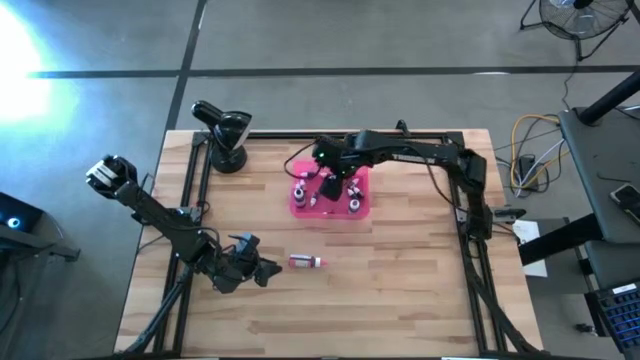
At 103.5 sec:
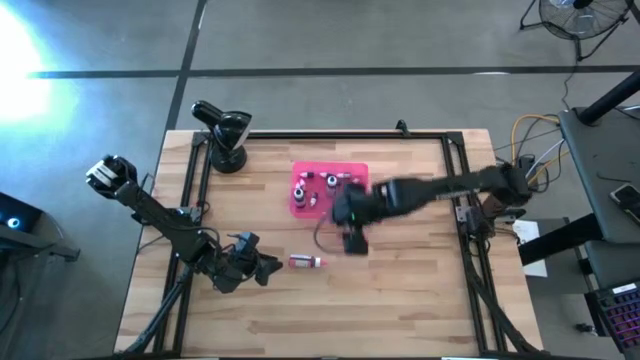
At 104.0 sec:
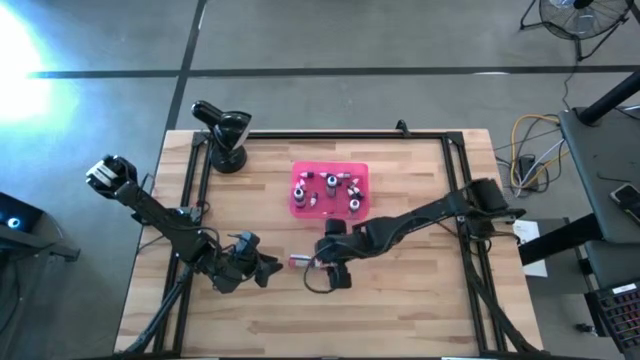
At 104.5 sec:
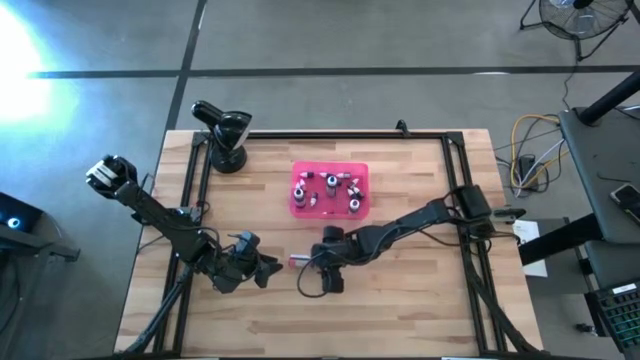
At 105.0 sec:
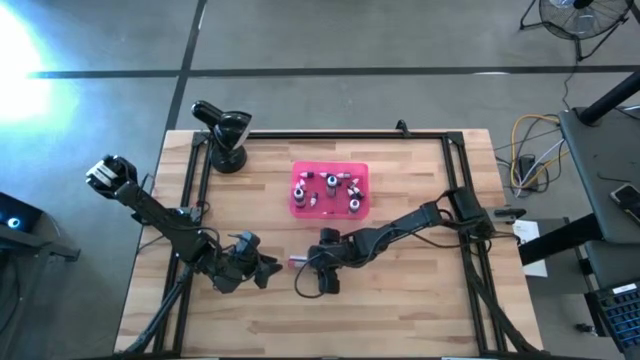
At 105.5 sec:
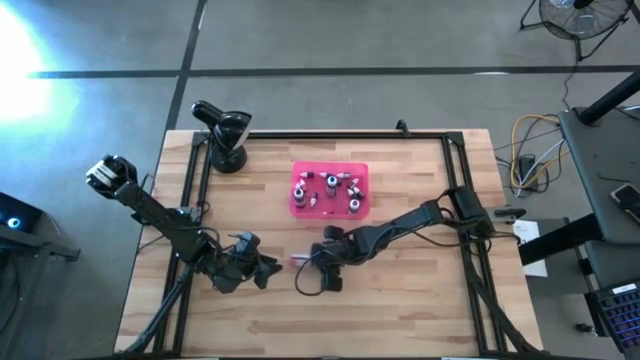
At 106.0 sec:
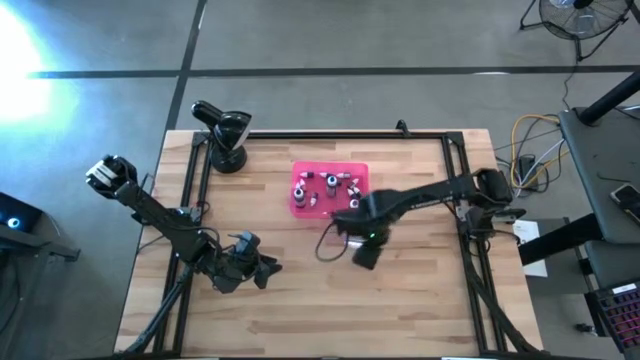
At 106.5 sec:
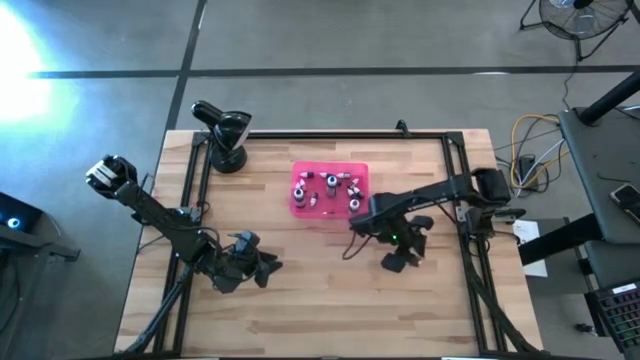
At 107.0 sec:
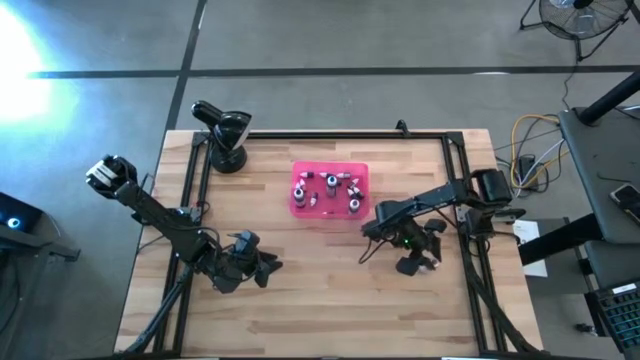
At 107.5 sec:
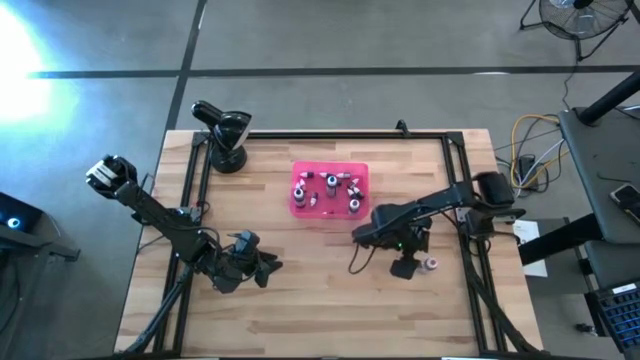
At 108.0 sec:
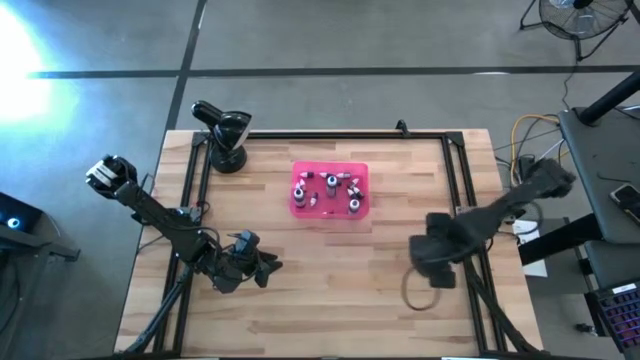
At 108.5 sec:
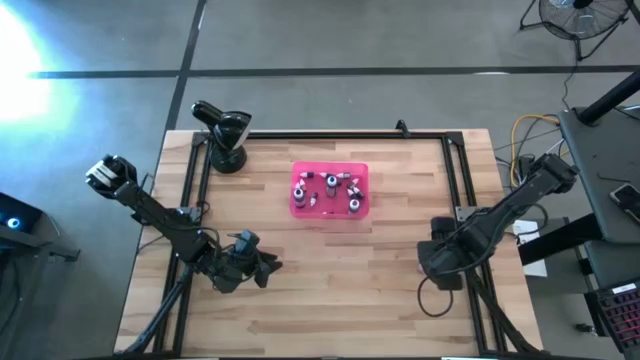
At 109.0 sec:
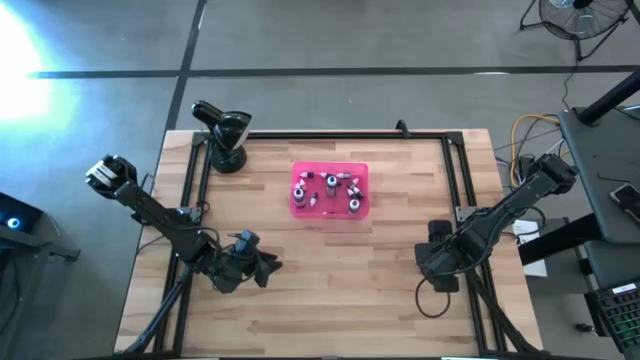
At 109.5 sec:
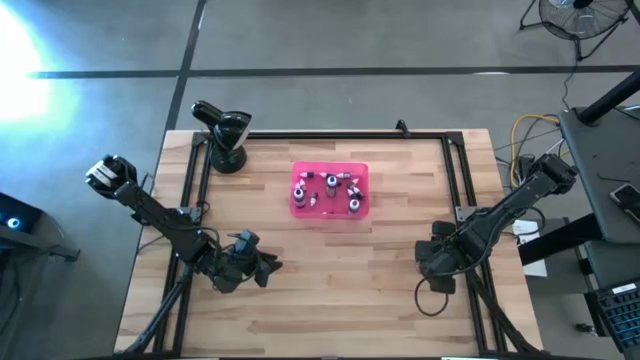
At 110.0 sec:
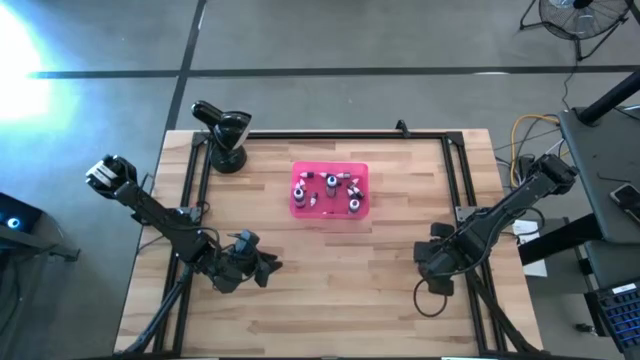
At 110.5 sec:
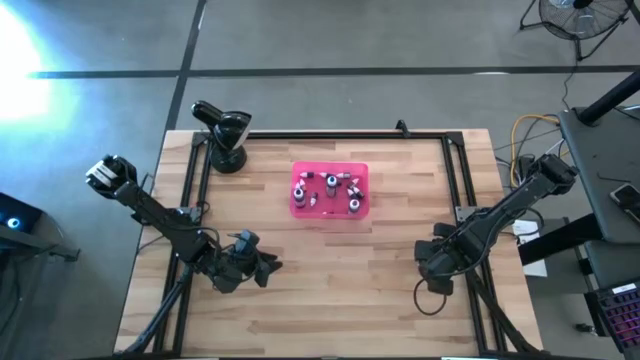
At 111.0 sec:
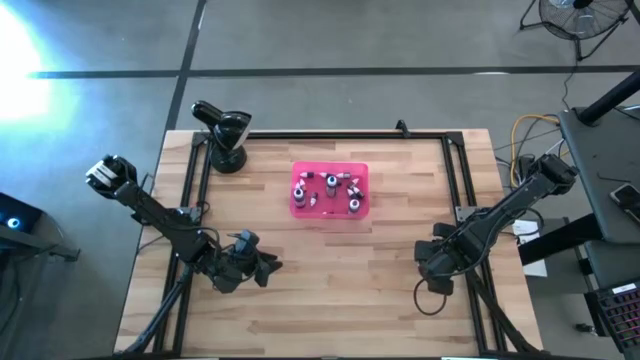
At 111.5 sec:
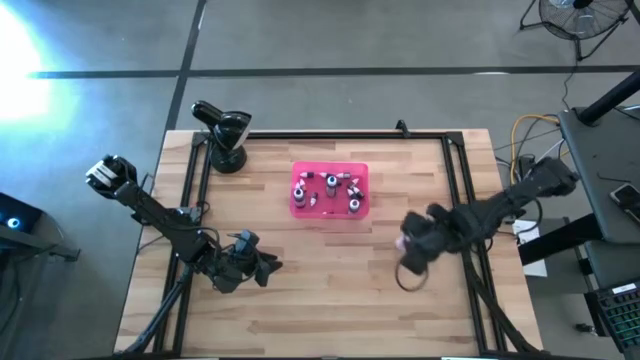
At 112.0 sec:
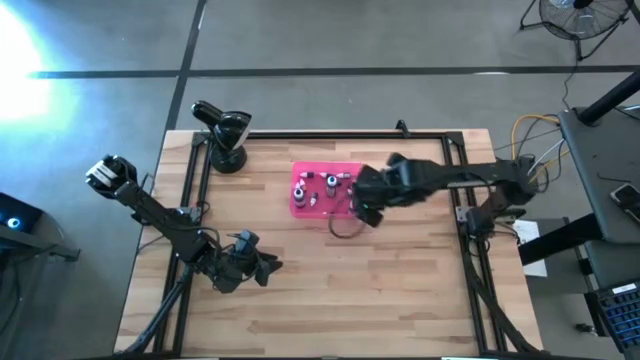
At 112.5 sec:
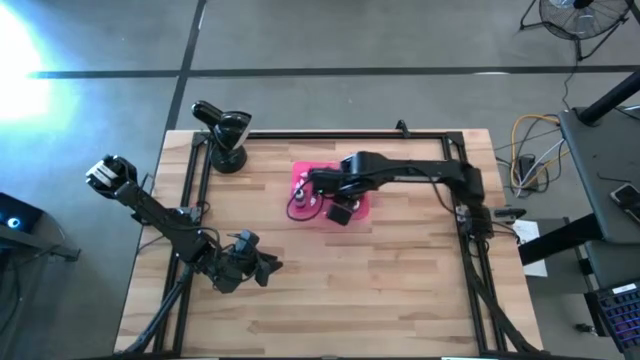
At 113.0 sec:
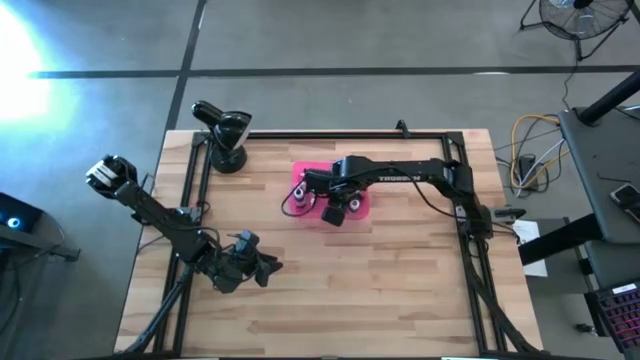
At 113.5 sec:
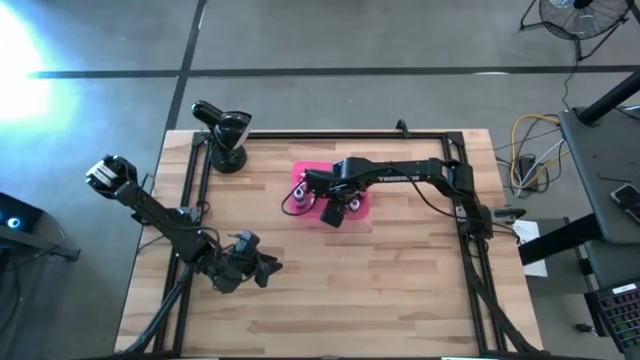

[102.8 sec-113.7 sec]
Task: Pick & Place food coloring
Put the pink food coloring bottle into the pink bin

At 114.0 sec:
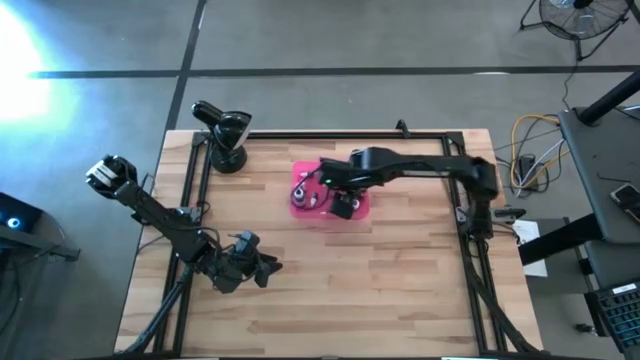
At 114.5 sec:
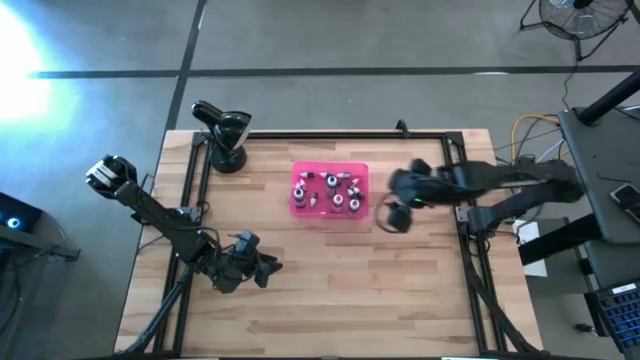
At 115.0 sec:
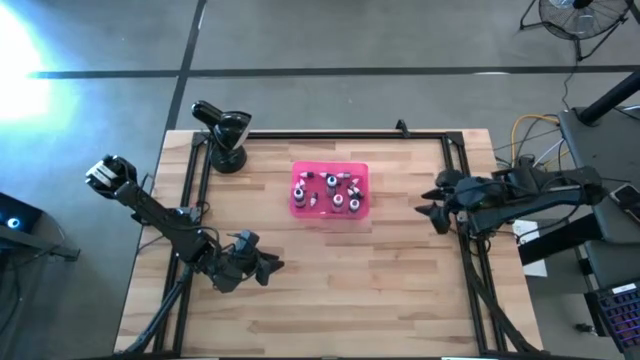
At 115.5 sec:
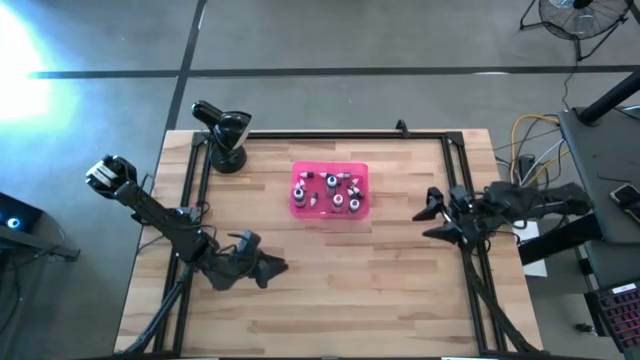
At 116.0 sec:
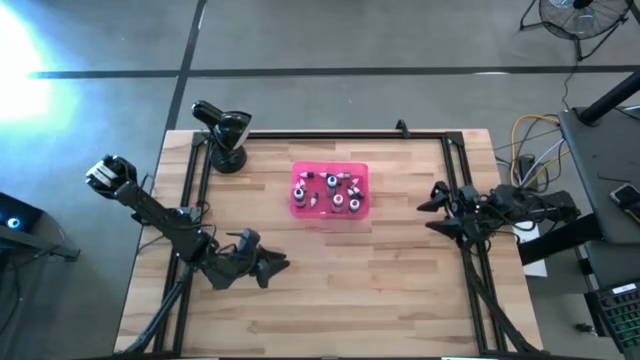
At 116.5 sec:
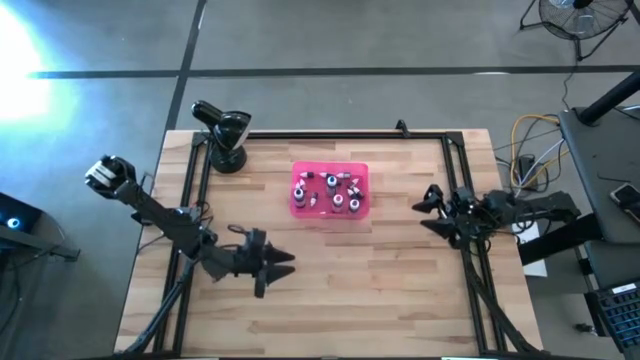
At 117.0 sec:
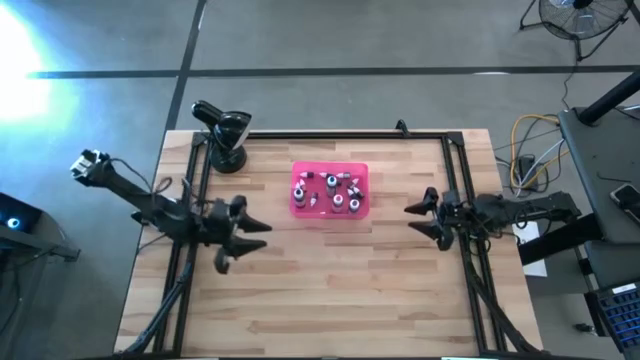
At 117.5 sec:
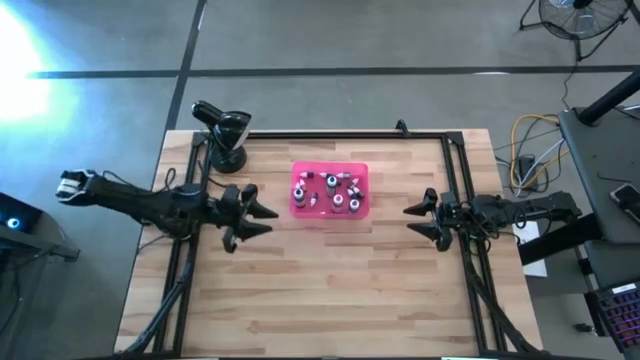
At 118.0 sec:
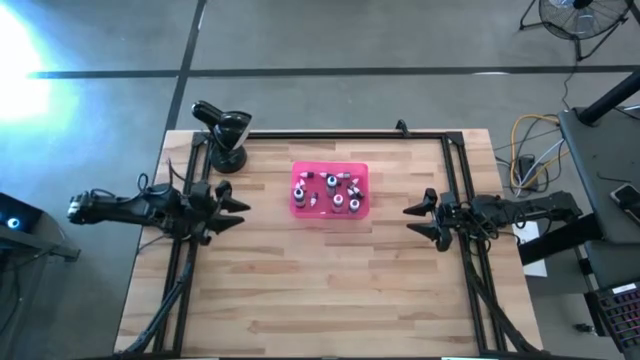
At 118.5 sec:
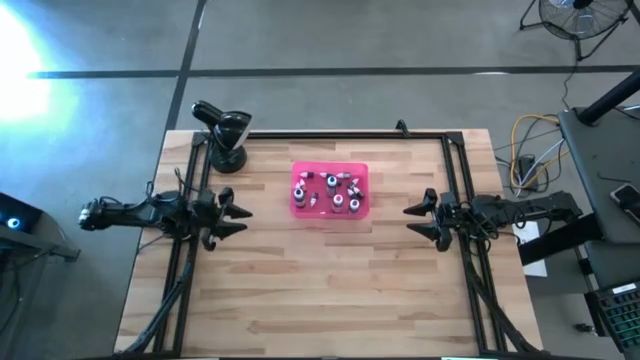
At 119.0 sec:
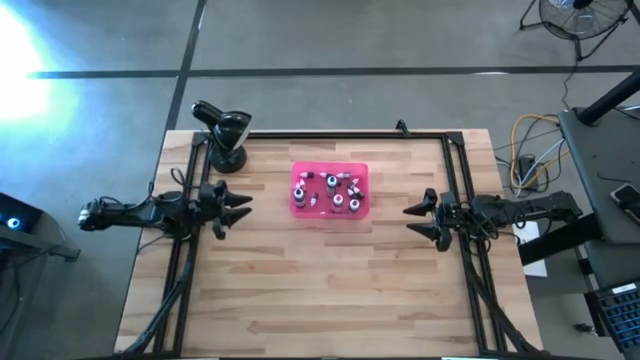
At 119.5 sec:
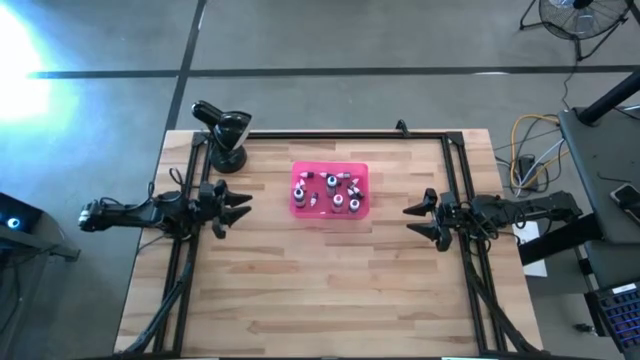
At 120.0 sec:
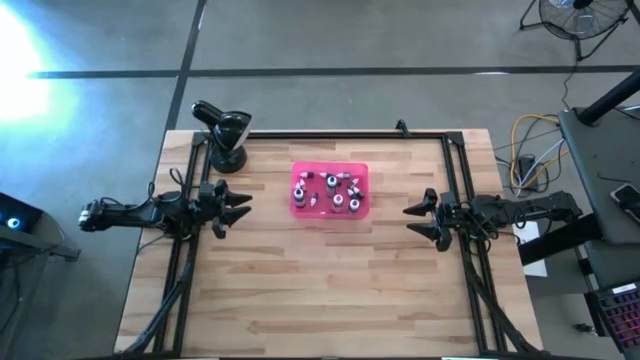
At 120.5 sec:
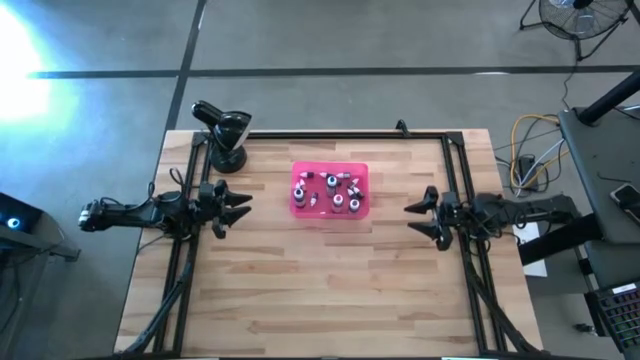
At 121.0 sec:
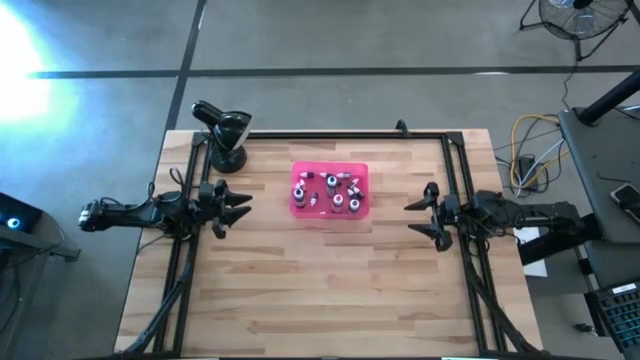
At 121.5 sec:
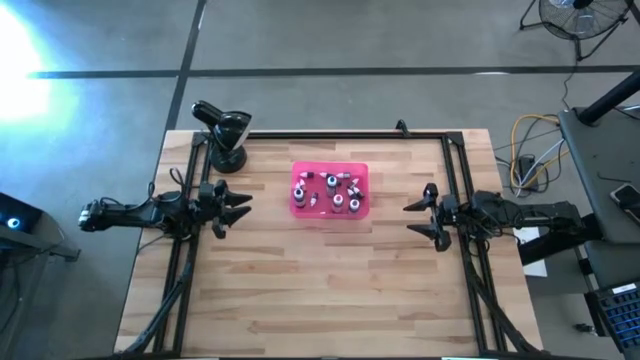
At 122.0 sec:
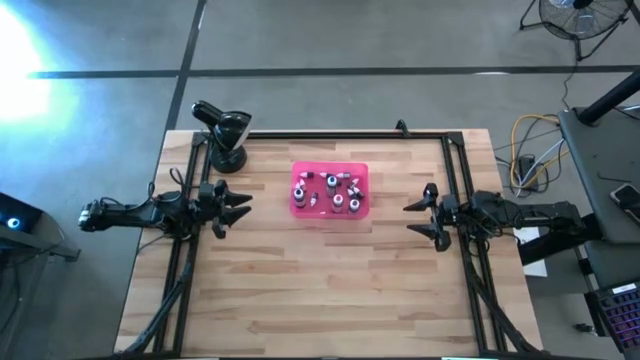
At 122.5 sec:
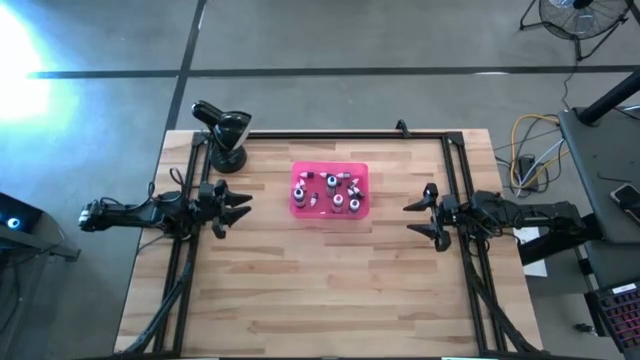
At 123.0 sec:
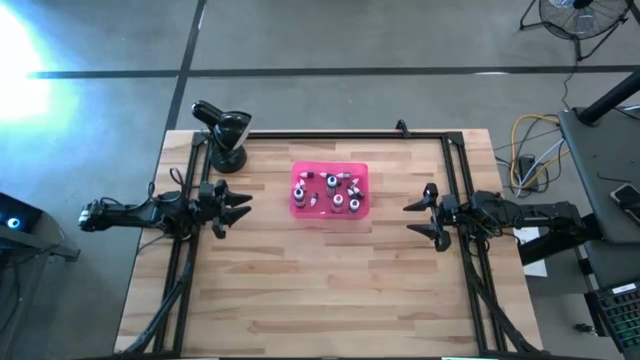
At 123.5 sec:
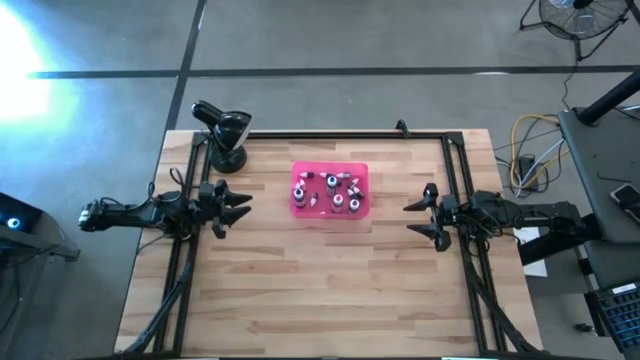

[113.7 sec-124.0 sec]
Return to Home Position
